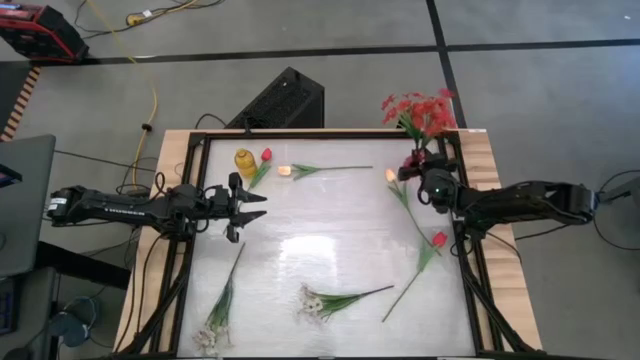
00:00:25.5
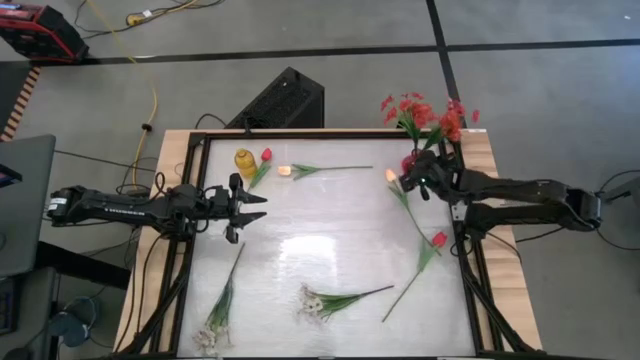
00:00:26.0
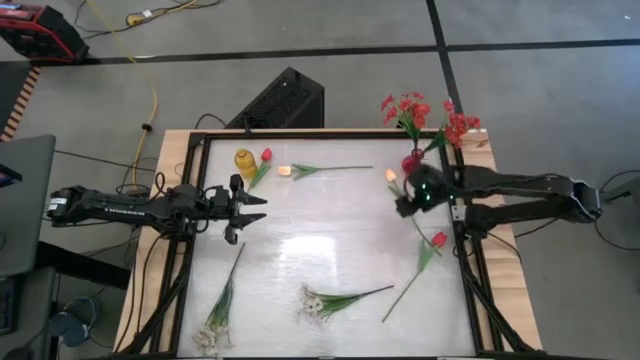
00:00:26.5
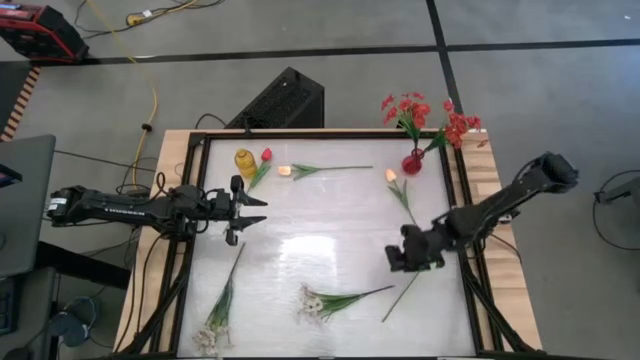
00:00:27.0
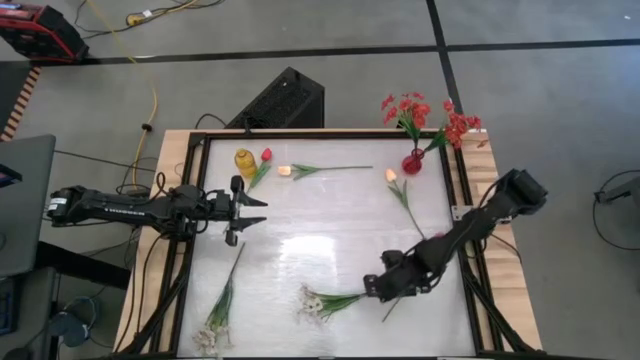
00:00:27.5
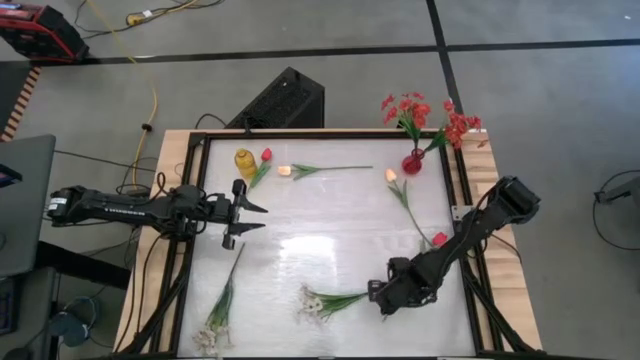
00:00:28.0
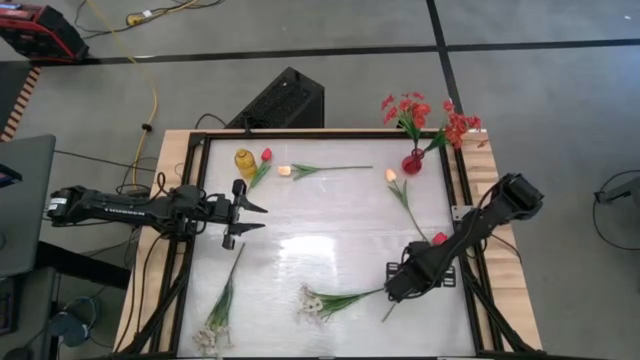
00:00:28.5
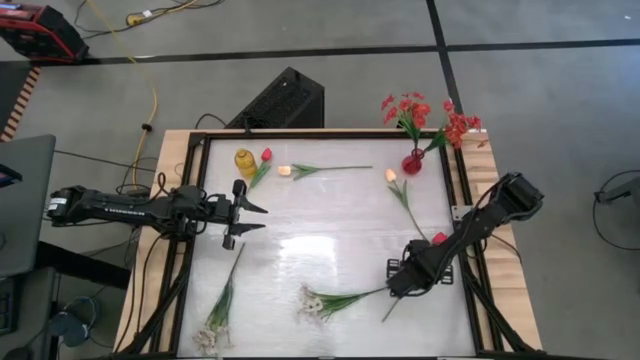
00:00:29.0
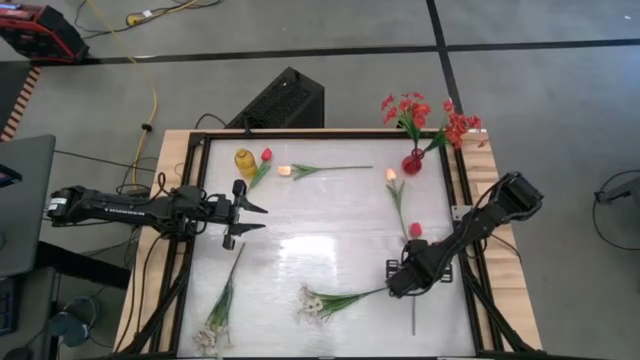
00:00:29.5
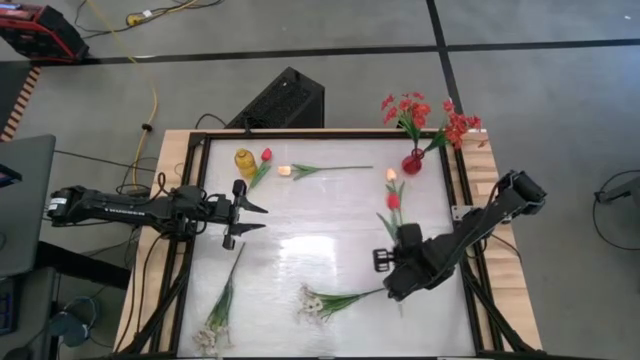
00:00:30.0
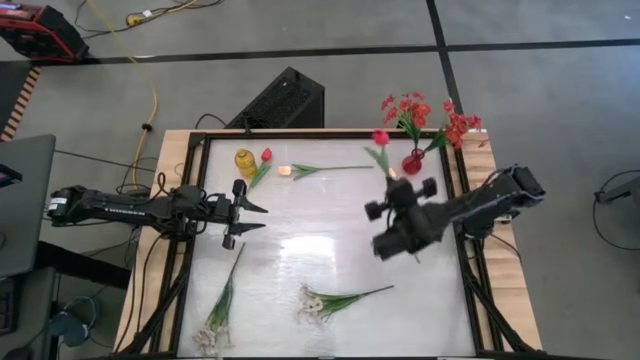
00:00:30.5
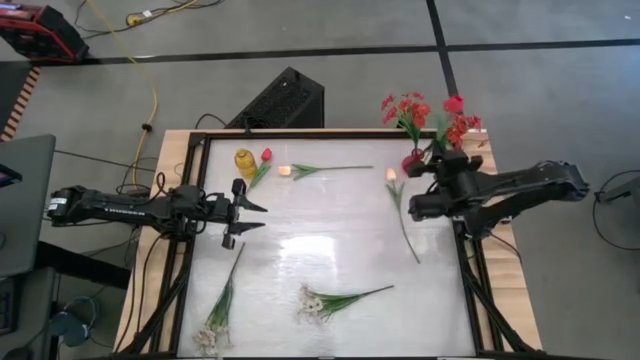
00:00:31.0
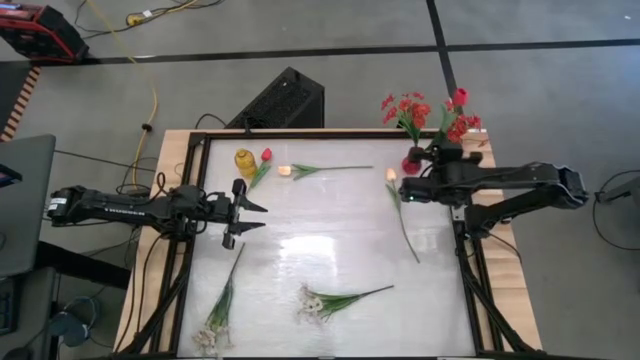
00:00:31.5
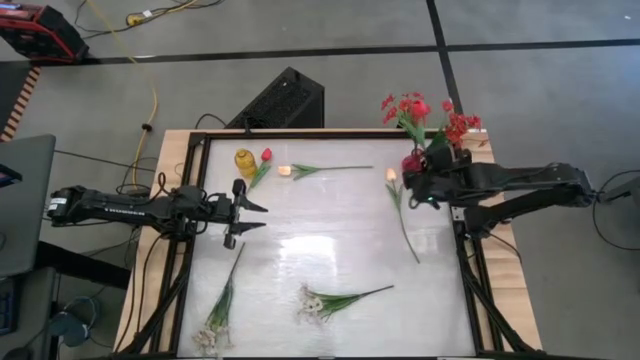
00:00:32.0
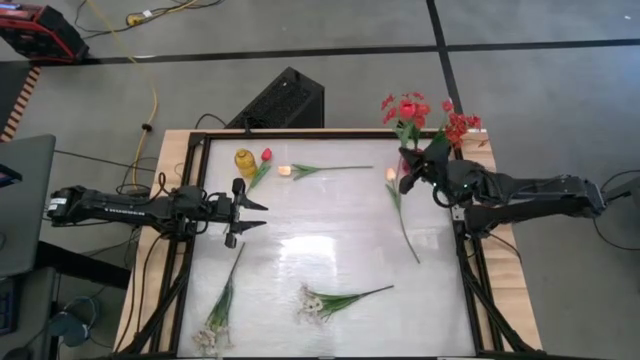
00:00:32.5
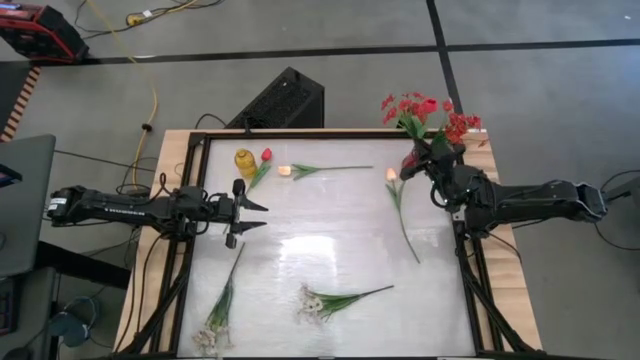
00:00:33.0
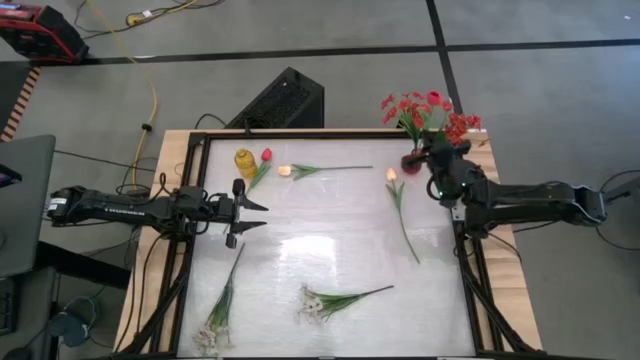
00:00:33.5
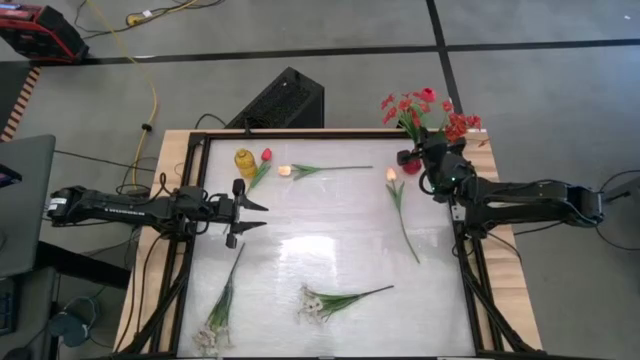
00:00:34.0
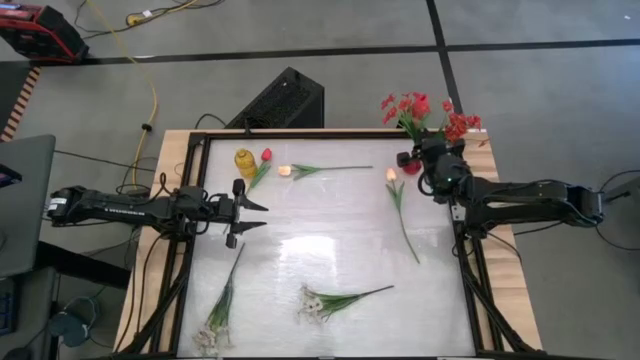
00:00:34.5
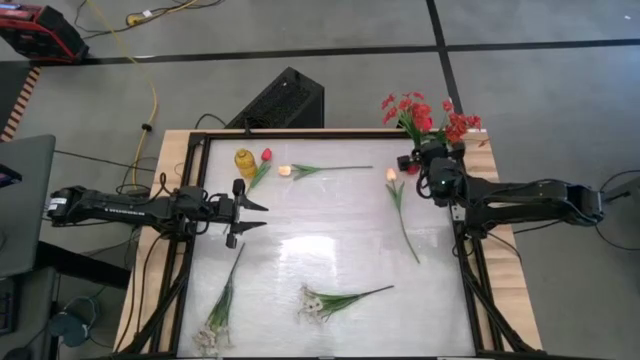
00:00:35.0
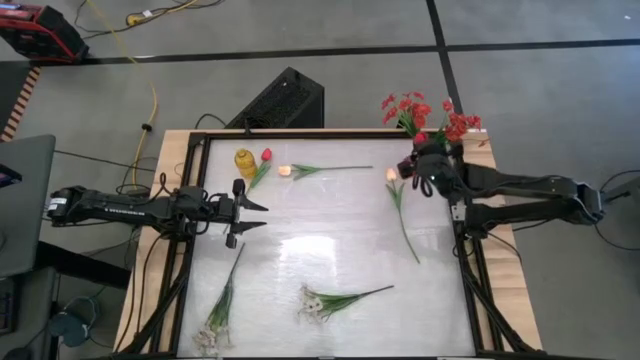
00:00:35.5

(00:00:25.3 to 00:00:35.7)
Task: Sort flowers into vase by color
Put the bottom red flower into the red vase

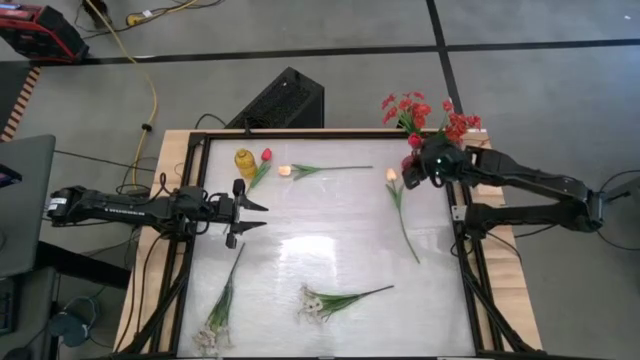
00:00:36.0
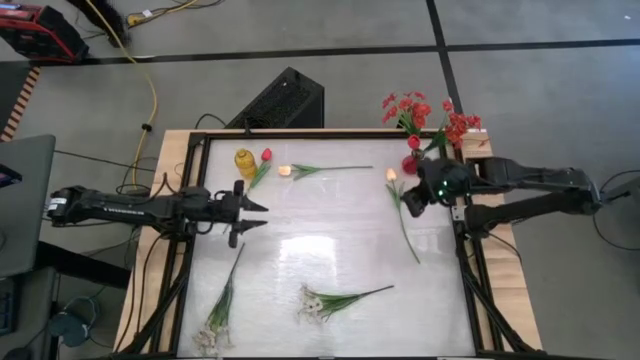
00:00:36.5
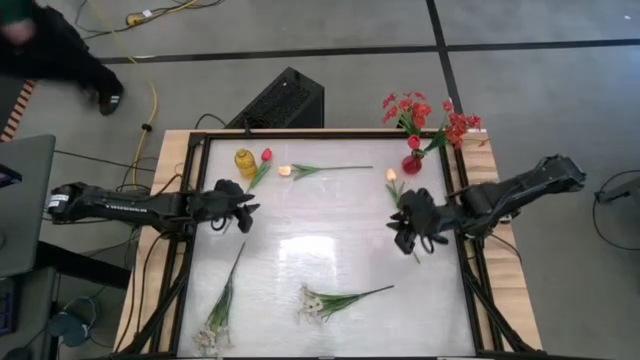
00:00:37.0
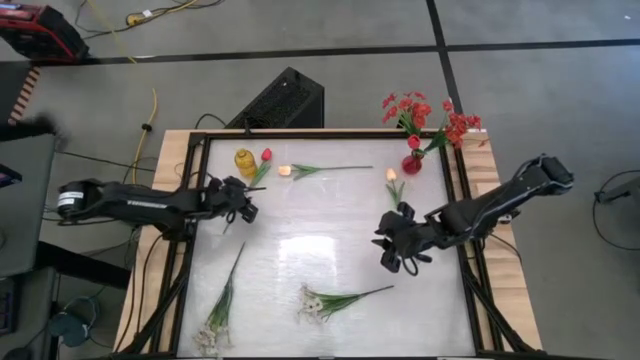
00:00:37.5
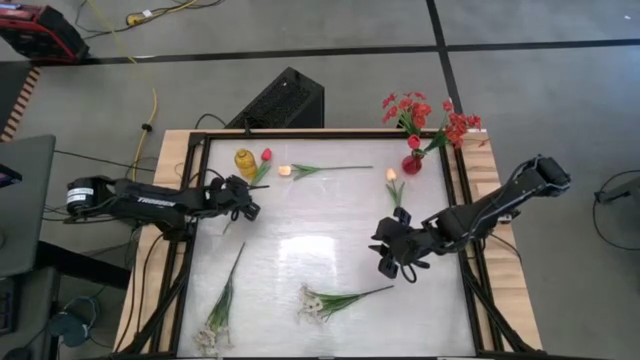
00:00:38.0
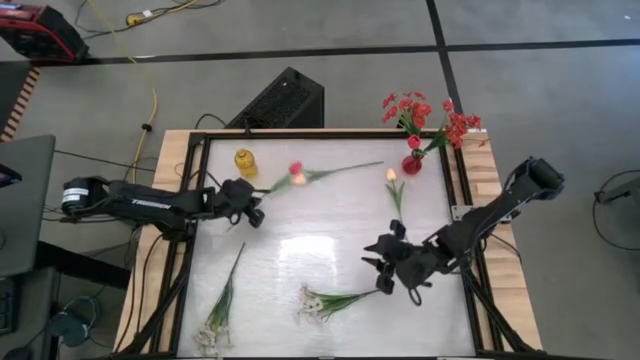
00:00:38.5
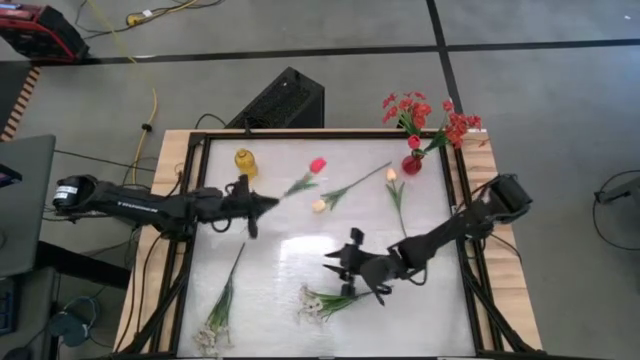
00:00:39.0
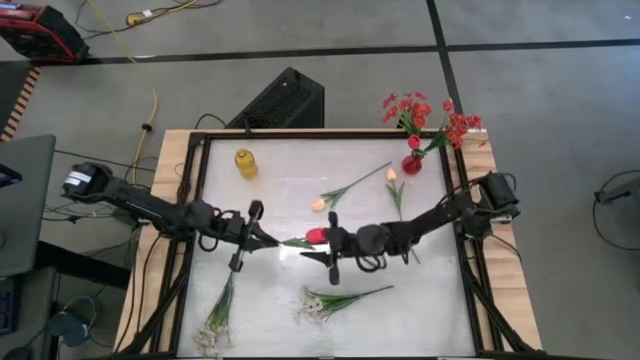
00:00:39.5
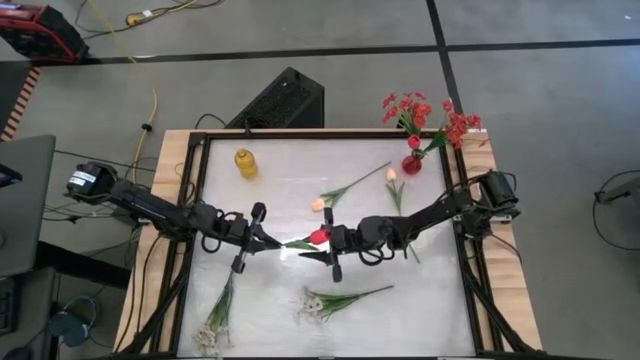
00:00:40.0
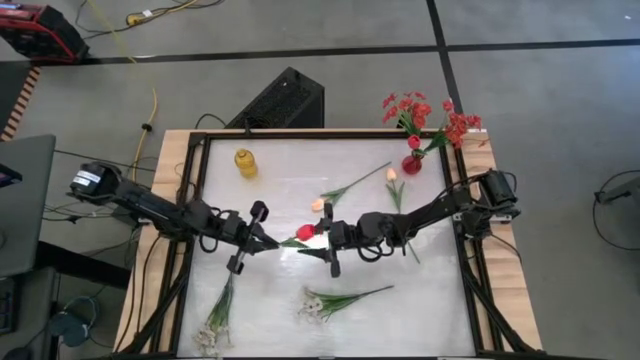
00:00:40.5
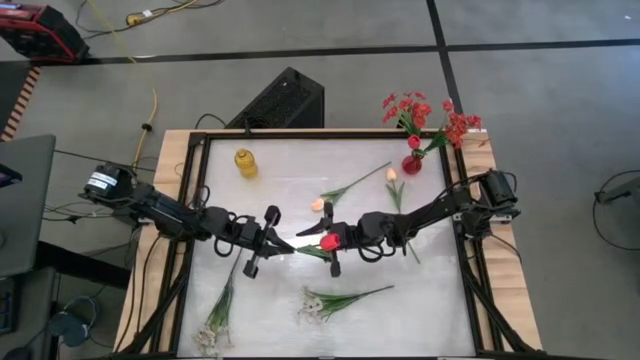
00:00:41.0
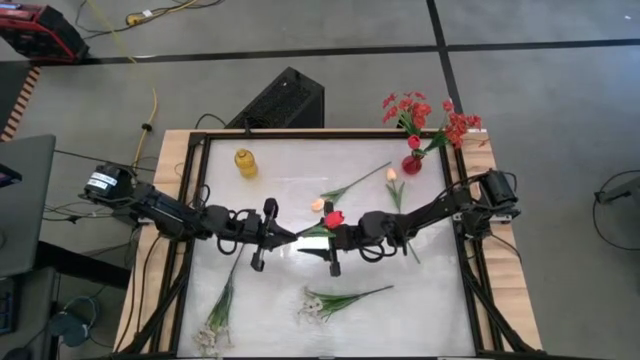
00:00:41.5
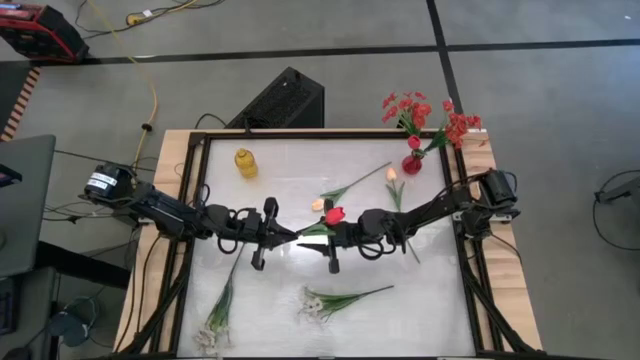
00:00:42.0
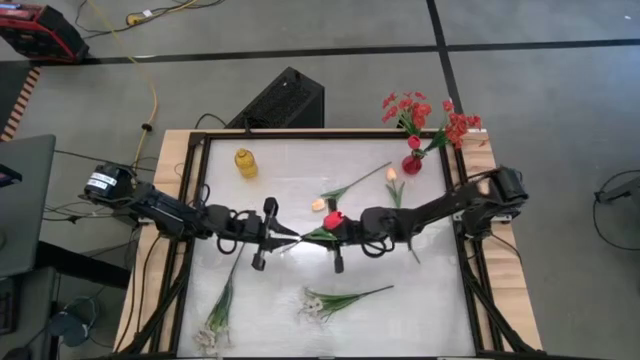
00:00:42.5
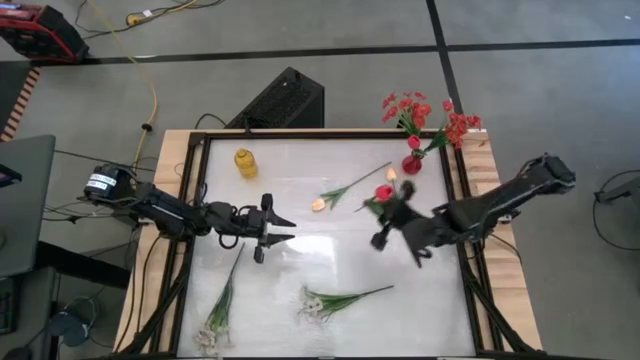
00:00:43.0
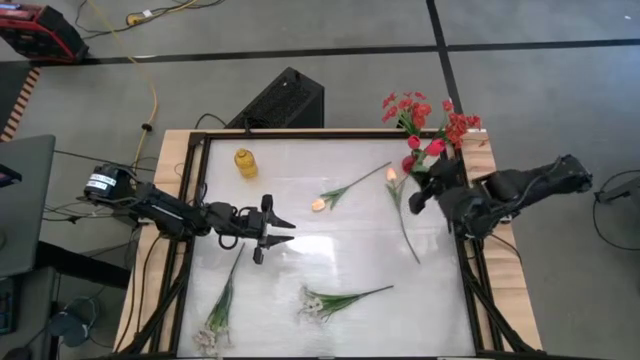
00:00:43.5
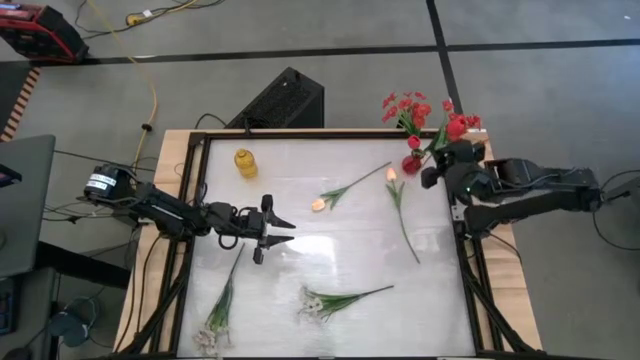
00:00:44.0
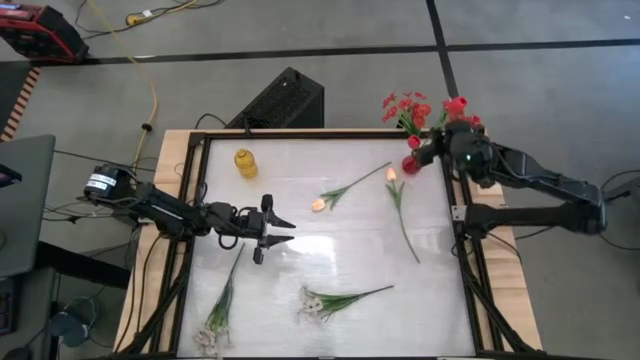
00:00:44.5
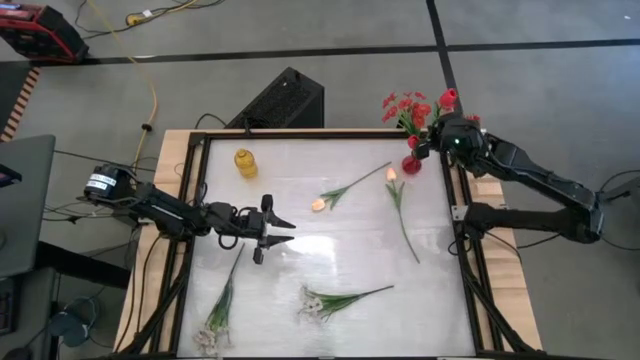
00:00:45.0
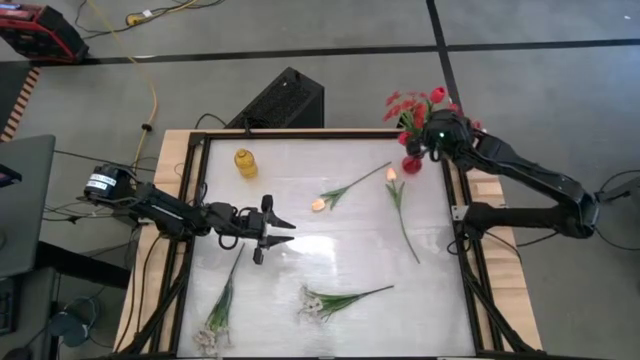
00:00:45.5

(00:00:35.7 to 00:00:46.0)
Put the red flower into the red vase

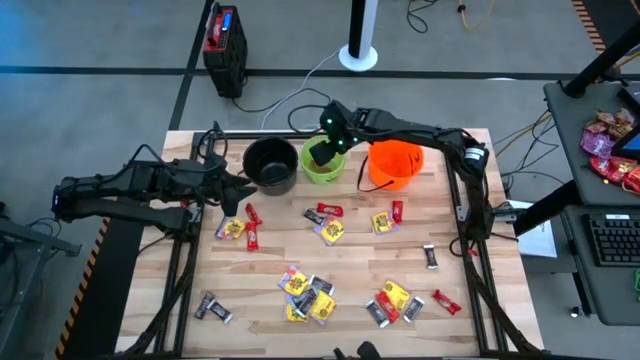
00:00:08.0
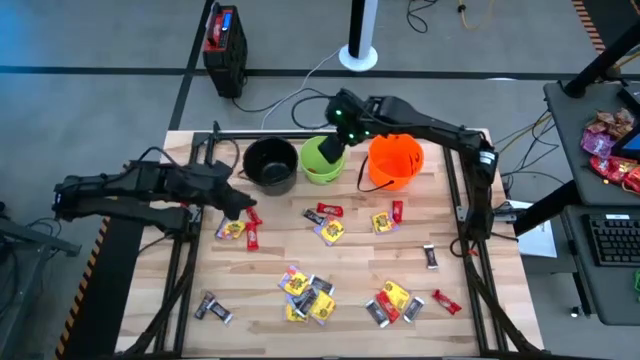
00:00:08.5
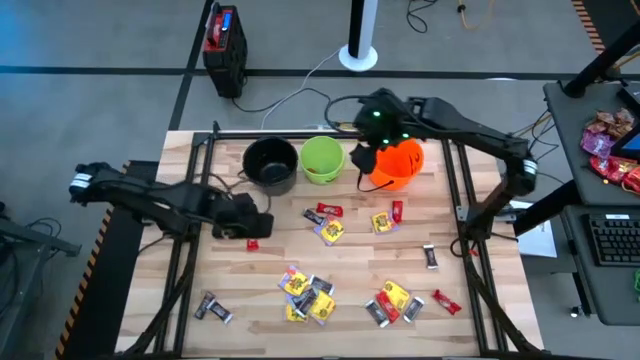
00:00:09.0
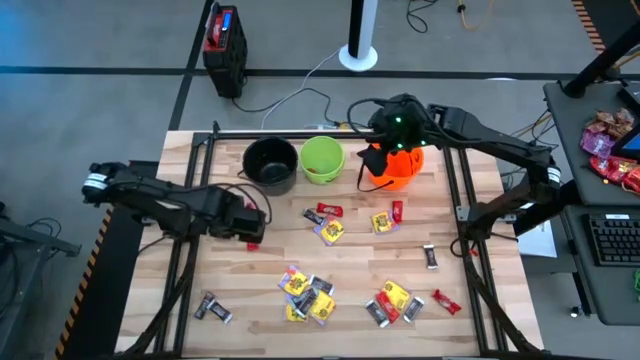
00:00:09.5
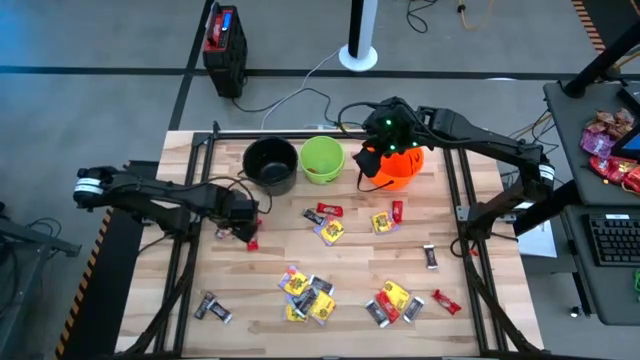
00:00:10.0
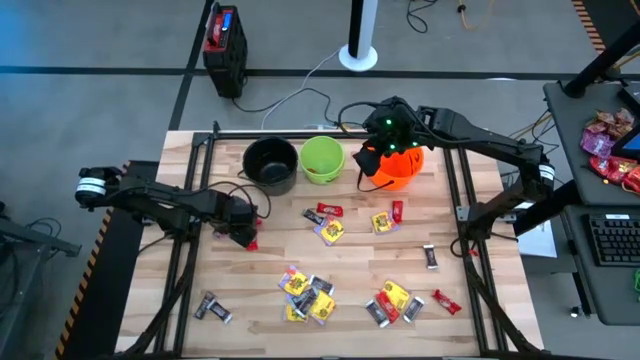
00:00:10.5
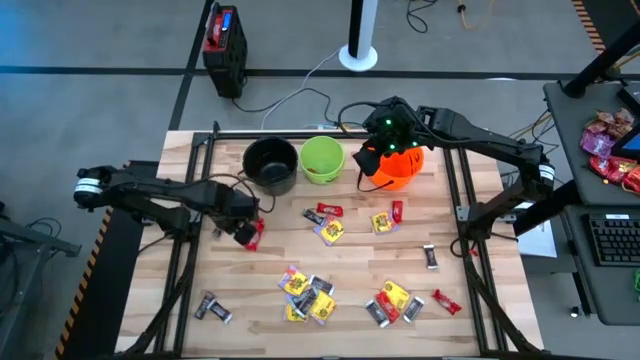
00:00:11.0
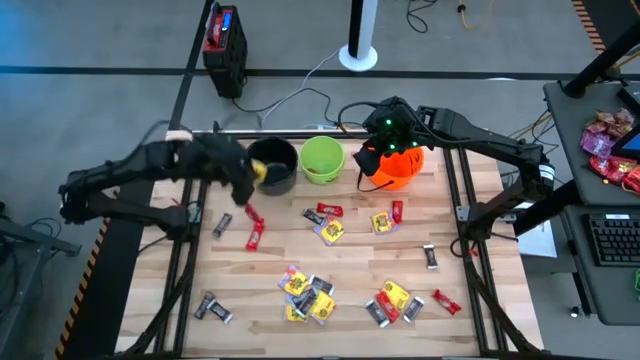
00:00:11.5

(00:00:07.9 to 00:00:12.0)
Task: Sort candy by brand, put in halloween buckets
Put the yellow candy into the black bucket
